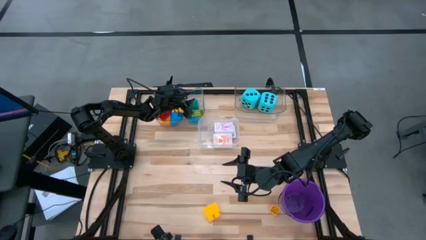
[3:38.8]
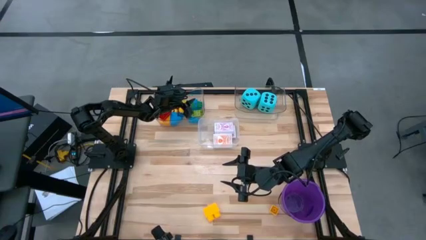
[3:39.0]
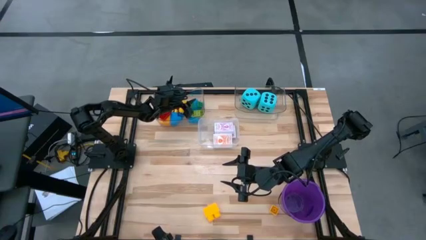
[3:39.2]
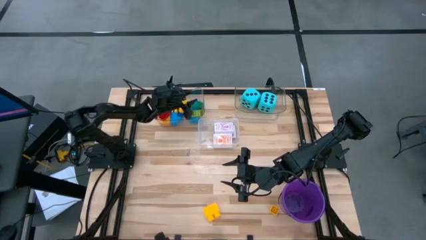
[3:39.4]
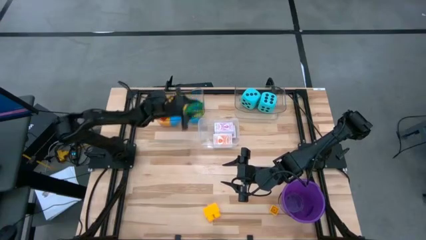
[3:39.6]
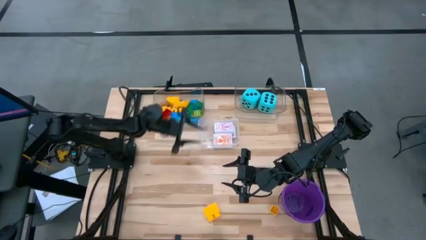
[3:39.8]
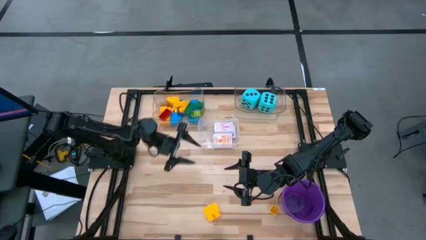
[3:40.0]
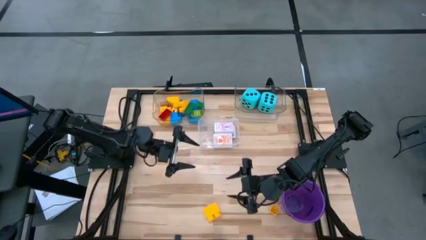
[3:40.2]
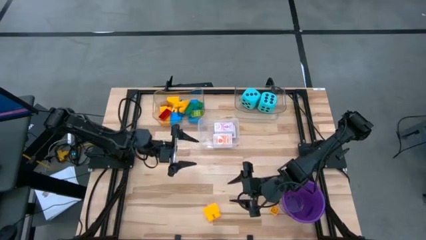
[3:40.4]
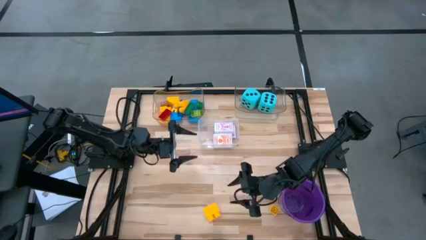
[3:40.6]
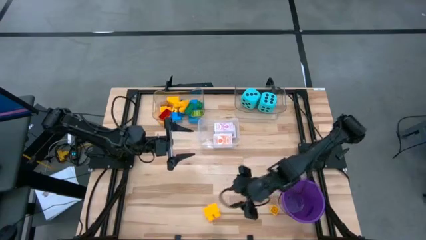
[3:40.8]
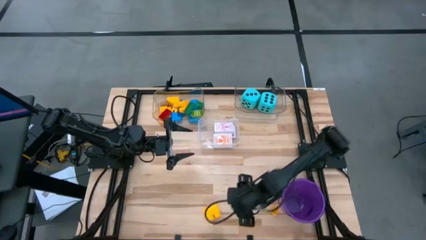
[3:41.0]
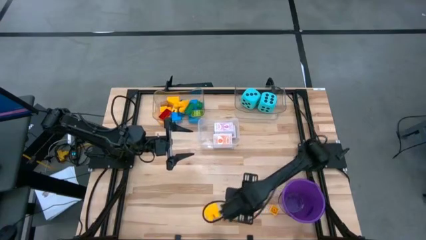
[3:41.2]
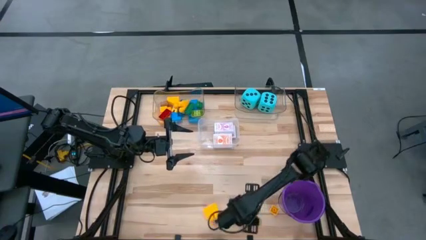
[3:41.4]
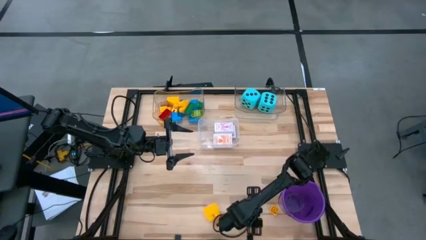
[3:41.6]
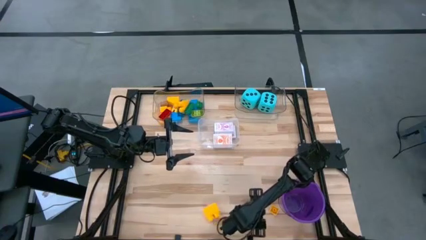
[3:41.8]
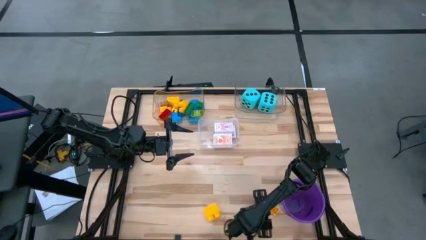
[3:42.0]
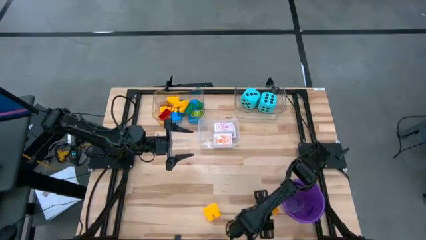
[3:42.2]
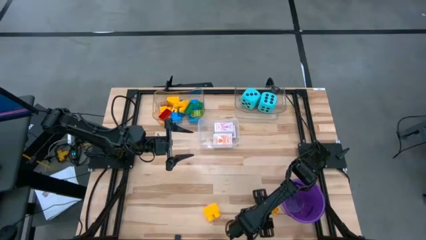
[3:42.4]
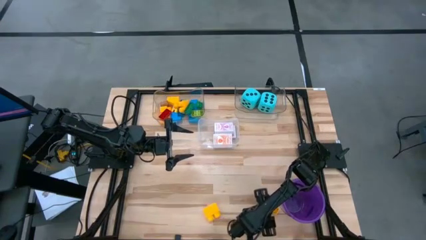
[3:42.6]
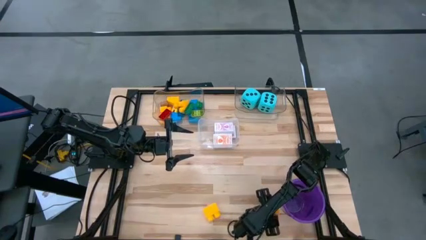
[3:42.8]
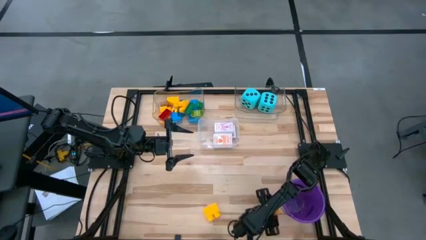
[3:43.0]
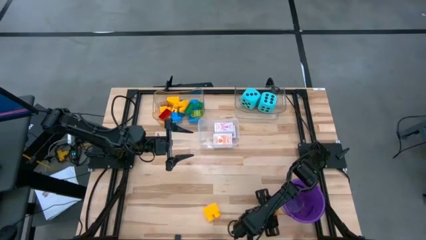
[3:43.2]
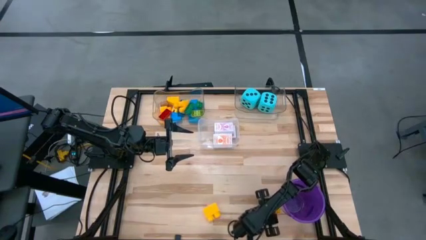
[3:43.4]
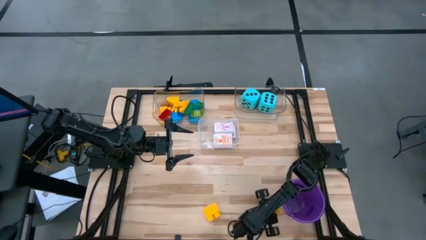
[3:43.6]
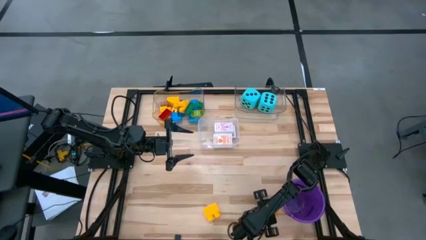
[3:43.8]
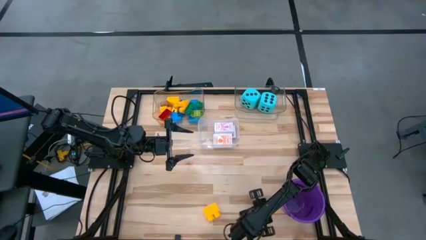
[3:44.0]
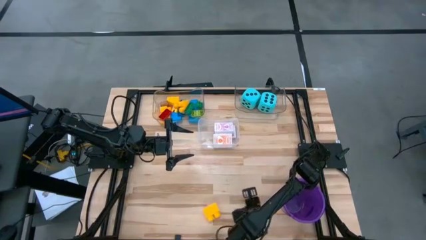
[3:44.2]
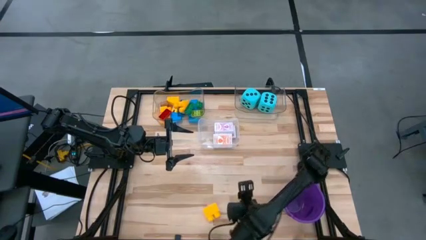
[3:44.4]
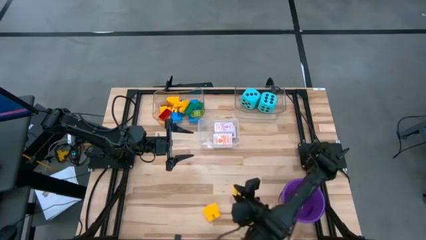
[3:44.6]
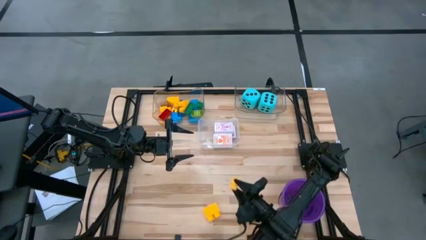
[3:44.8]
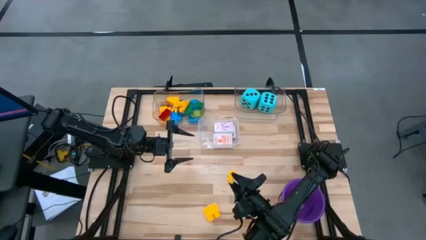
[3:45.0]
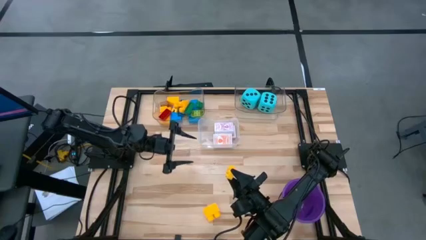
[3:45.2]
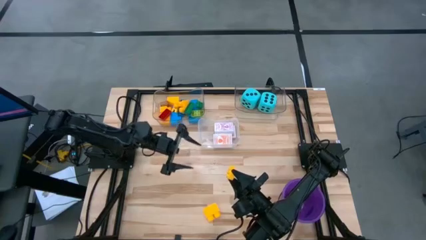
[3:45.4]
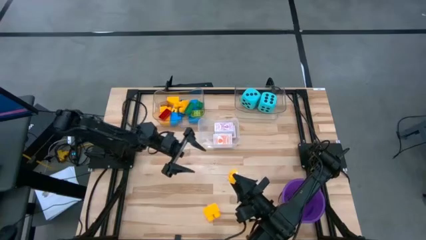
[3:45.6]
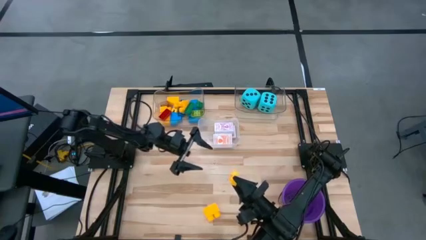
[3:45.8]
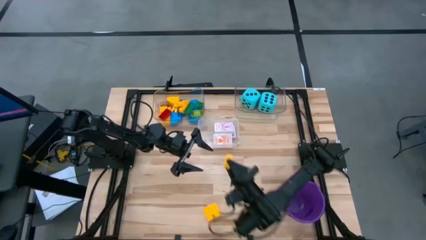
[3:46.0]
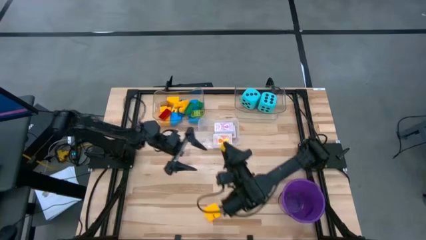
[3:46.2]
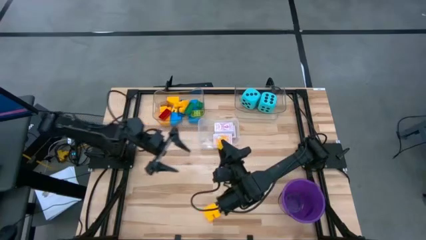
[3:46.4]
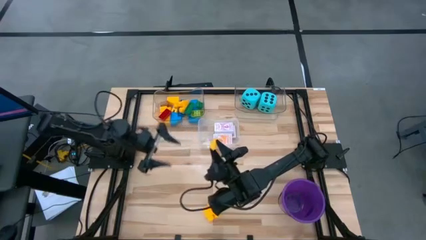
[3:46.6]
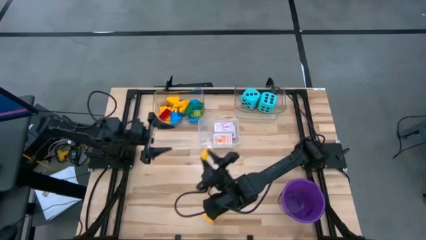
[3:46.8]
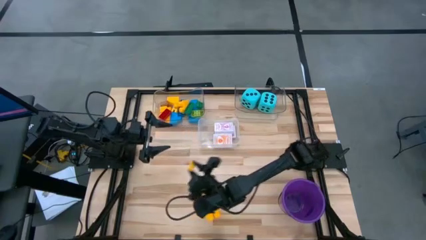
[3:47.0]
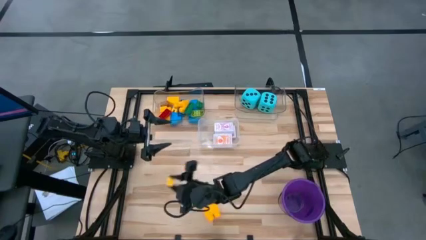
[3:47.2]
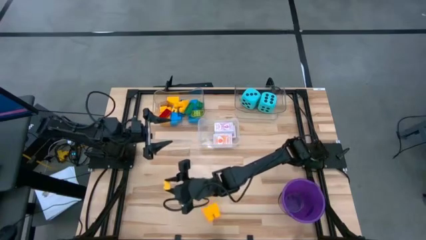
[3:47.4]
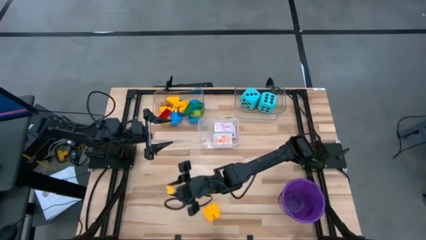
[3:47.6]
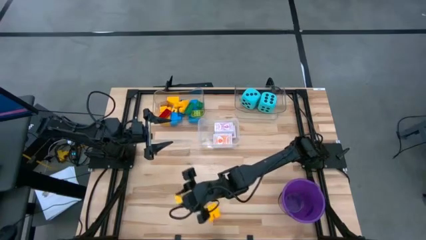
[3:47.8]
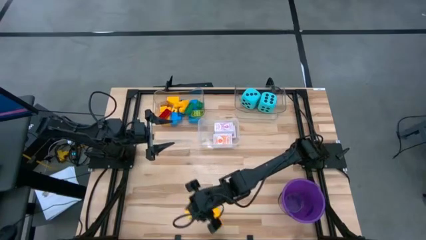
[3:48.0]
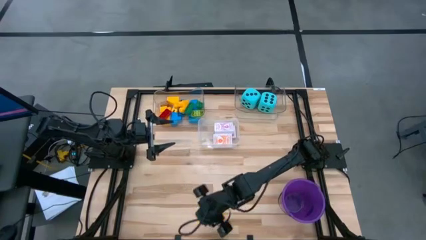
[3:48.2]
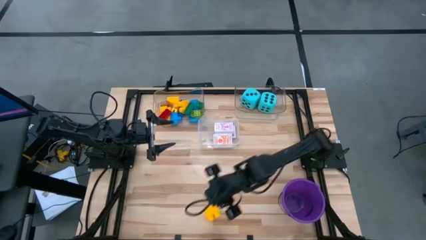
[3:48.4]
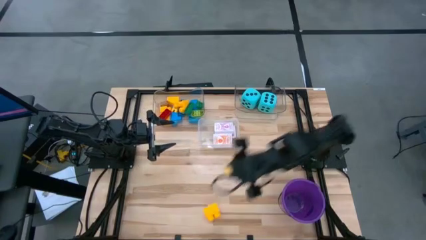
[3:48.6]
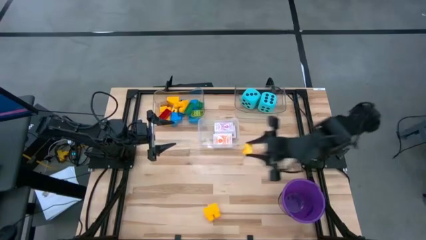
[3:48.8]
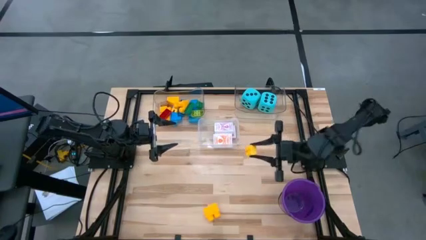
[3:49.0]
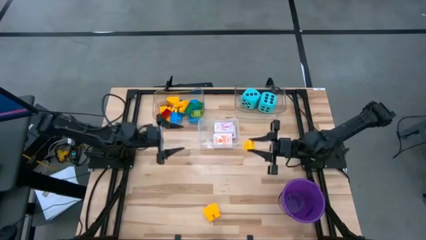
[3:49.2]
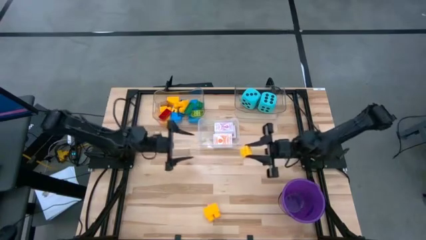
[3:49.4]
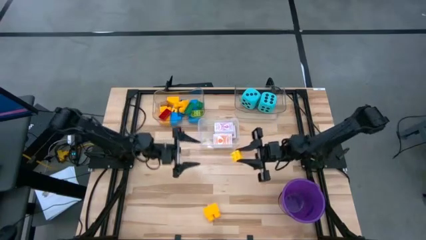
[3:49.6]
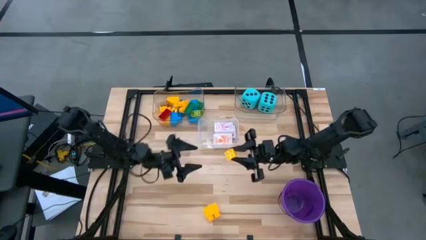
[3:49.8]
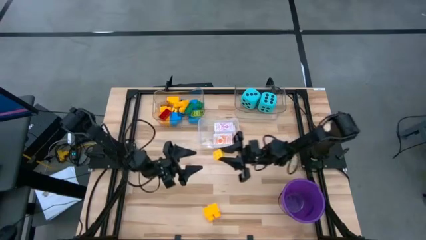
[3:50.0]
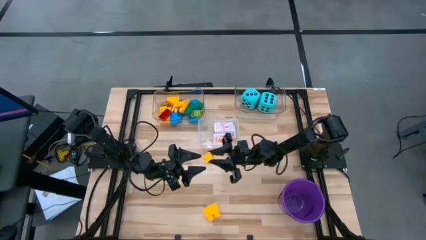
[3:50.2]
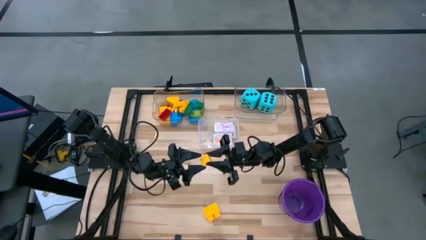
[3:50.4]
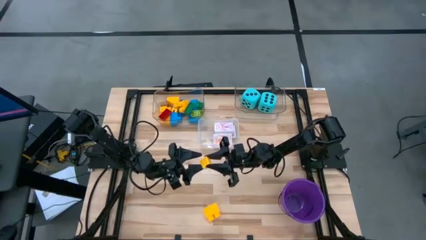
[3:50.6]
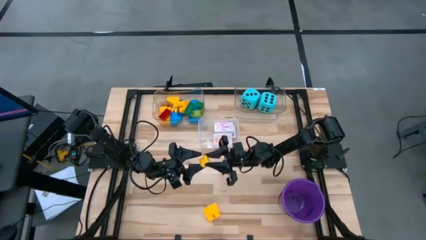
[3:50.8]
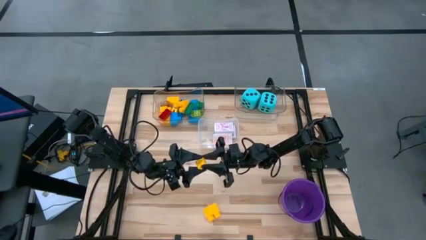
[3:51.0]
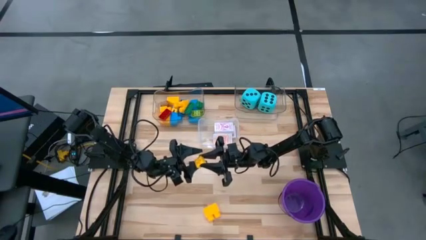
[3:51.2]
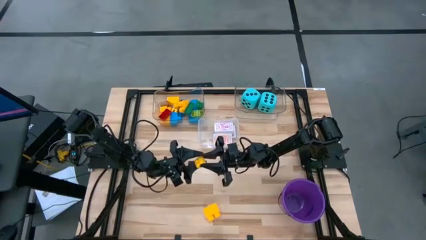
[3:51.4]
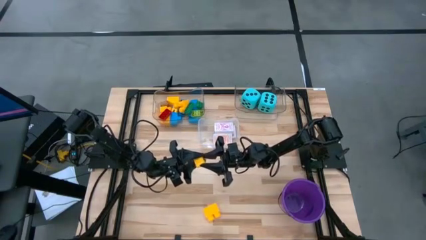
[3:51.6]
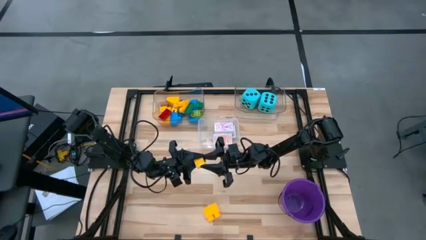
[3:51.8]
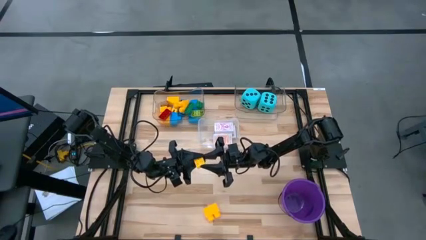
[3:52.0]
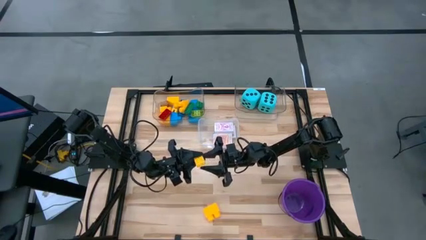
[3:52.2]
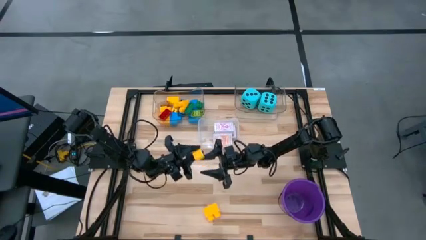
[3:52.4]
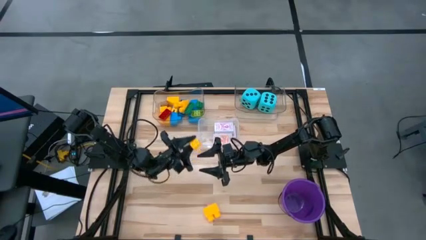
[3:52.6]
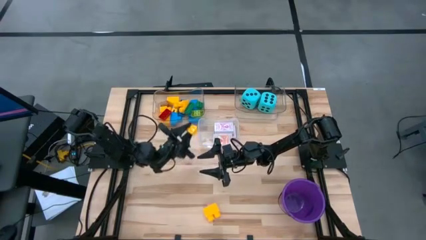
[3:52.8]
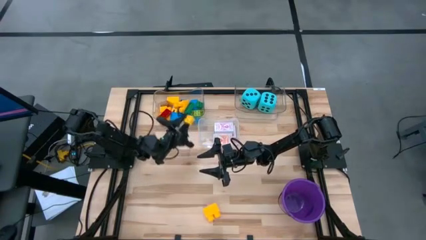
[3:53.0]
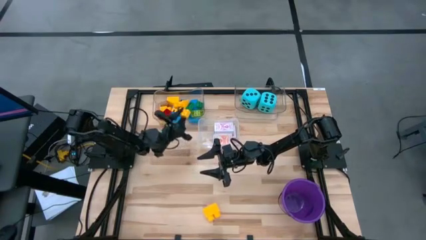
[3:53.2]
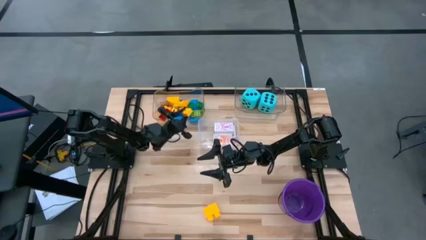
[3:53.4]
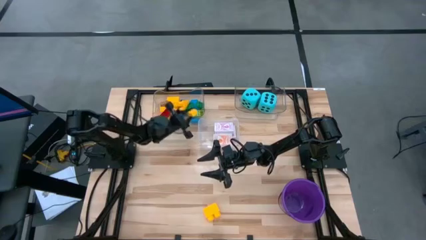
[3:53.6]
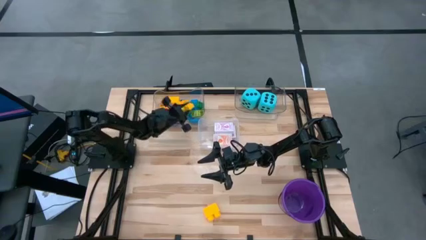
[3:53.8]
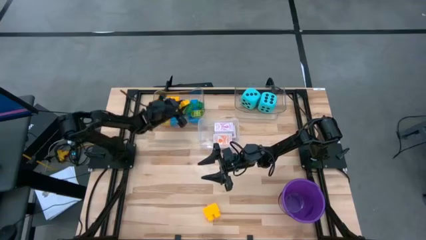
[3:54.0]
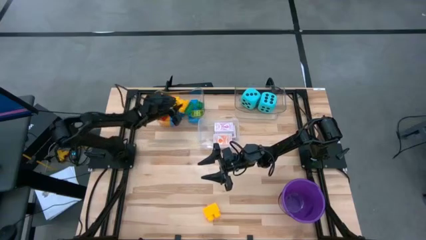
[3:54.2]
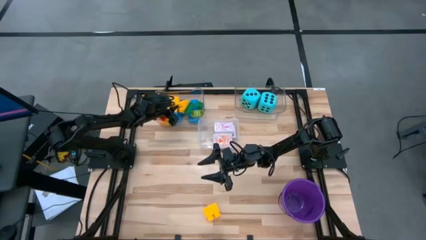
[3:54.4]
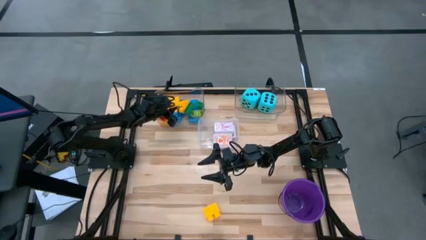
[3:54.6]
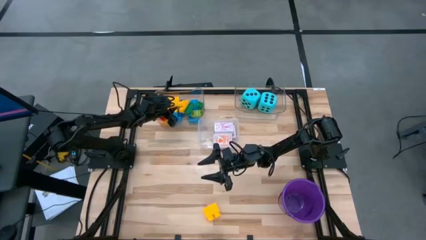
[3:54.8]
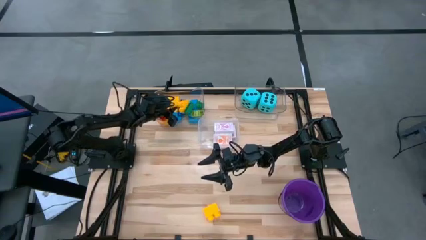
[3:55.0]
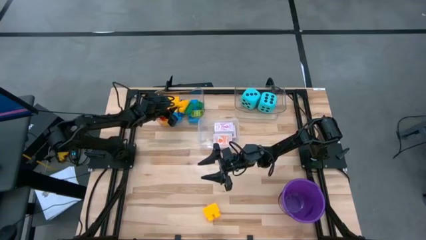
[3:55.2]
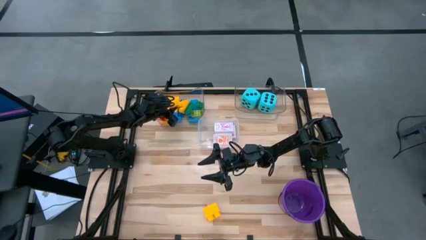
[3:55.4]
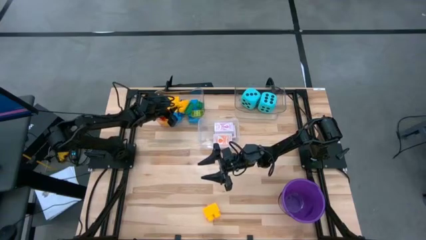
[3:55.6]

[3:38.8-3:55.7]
Task: Pick & Place Toys
Put the yellow game piece into the top left transparent bin
